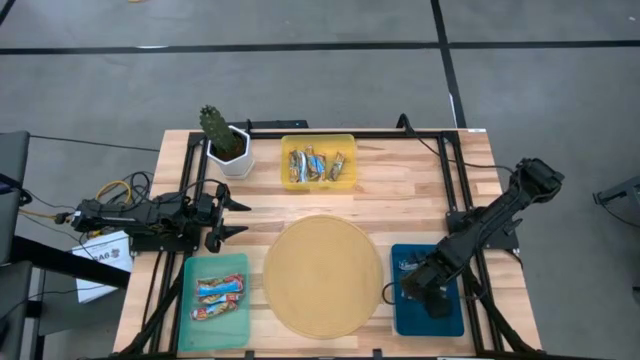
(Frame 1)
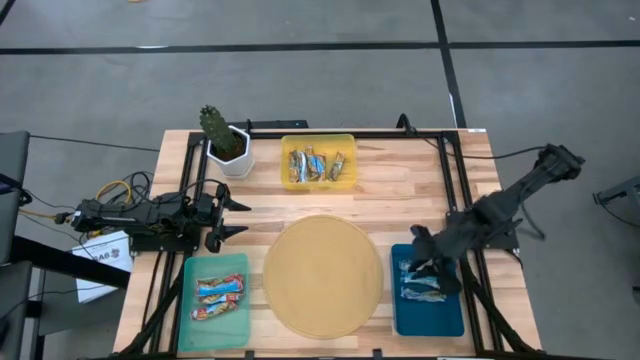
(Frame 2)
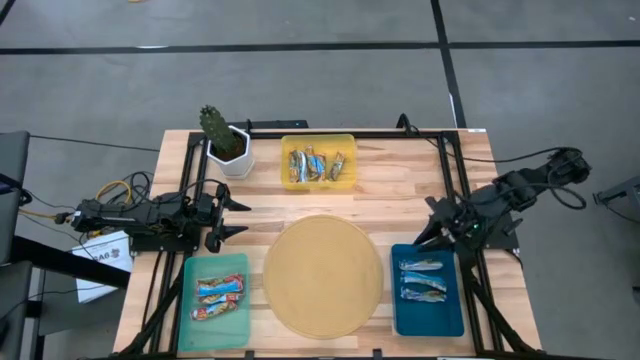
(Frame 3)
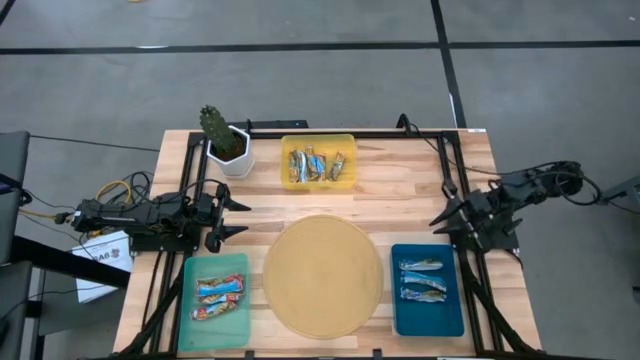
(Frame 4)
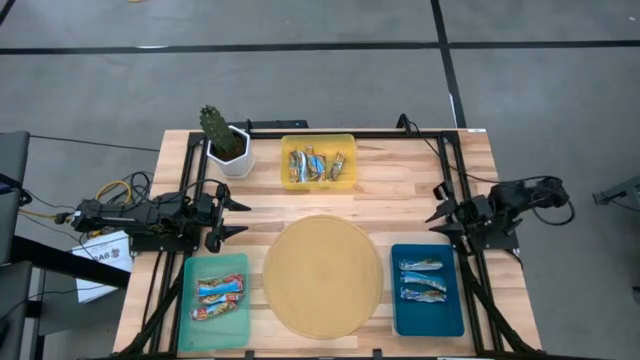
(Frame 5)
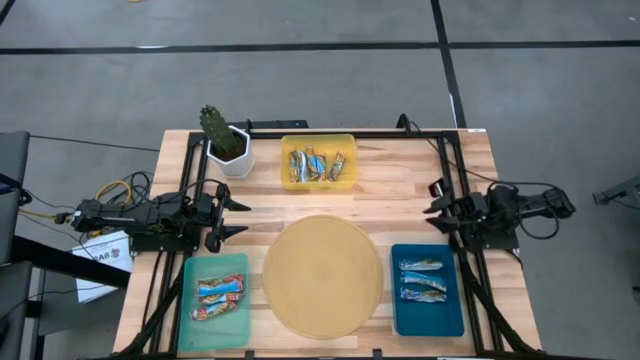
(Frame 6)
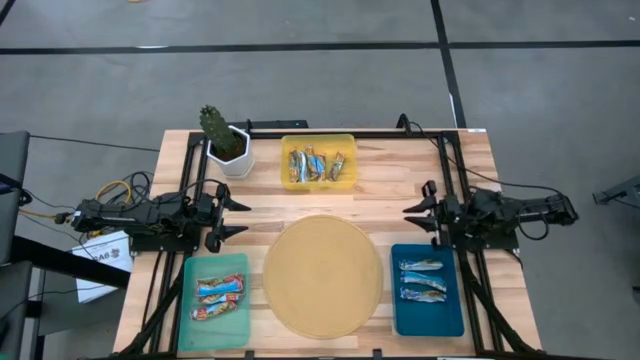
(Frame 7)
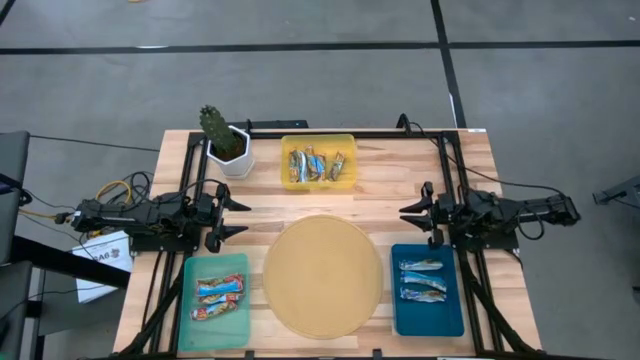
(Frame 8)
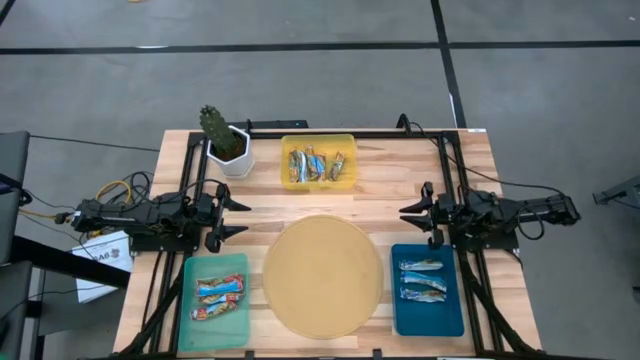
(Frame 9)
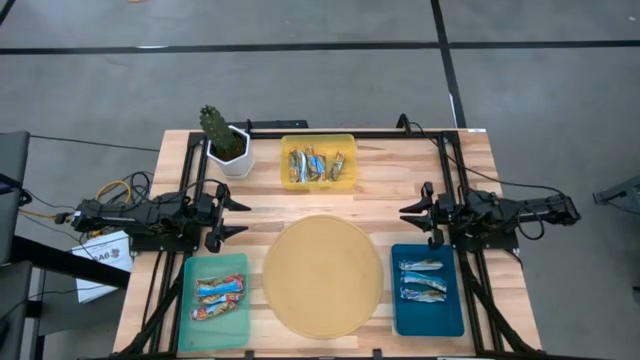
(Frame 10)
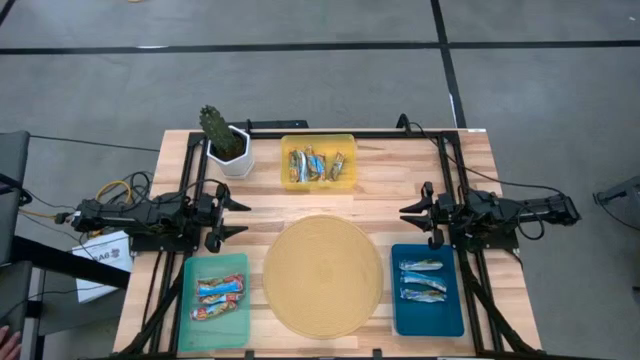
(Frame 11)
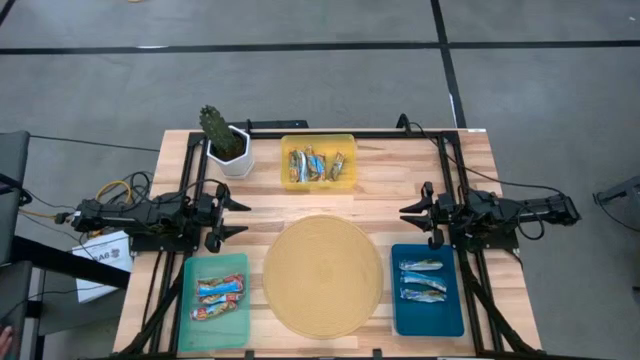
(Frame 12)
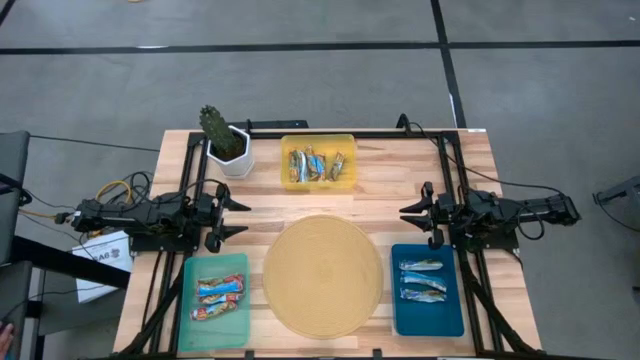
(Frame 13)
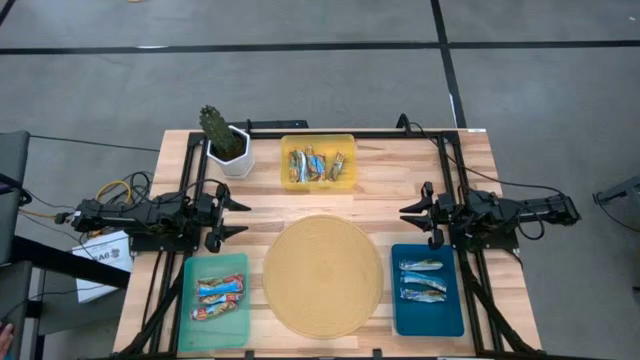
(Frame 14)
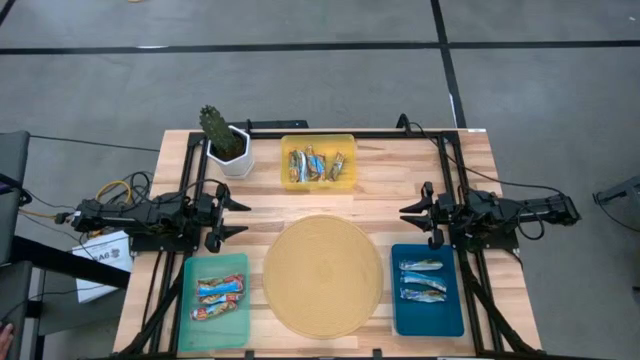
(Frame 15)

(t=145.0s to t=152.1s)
Task: Pick and place Granola Bars by type
Return to Home Position

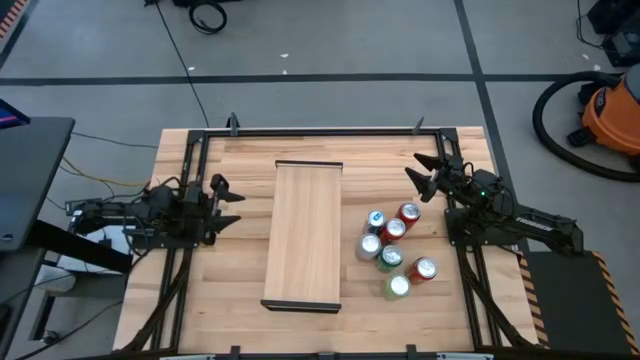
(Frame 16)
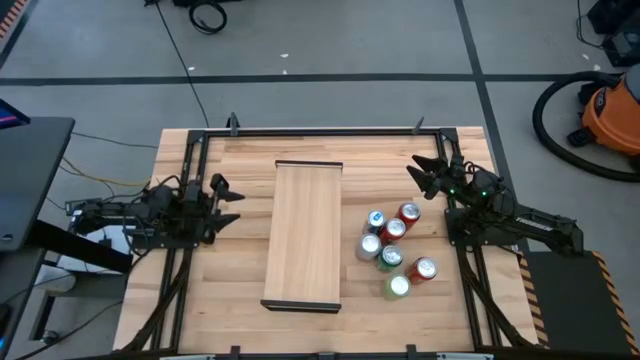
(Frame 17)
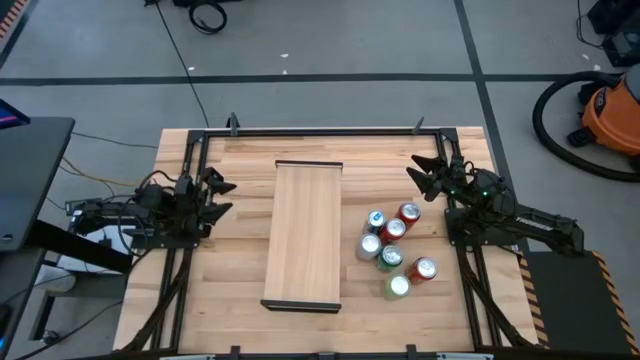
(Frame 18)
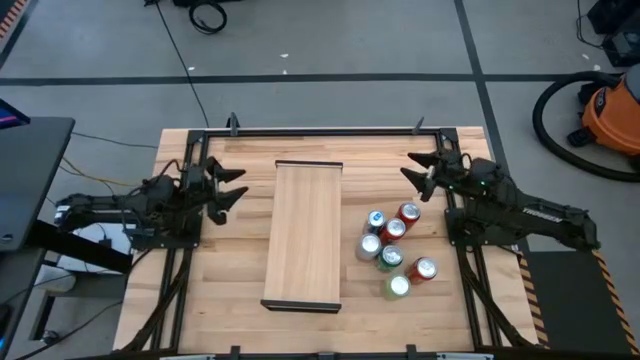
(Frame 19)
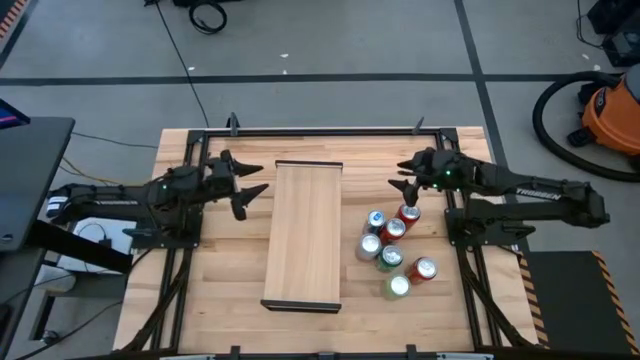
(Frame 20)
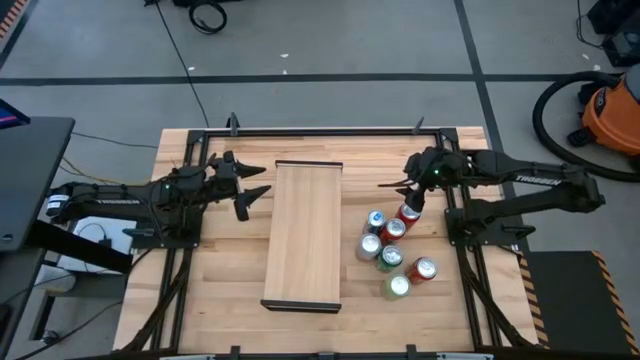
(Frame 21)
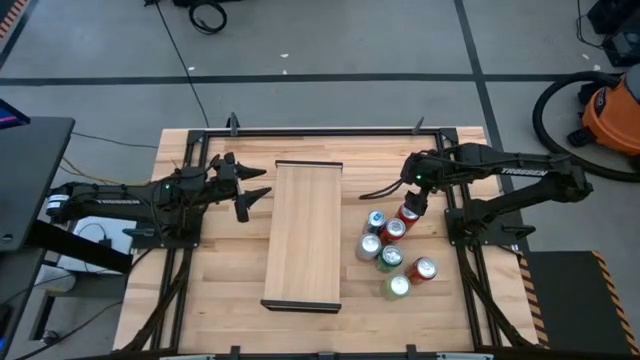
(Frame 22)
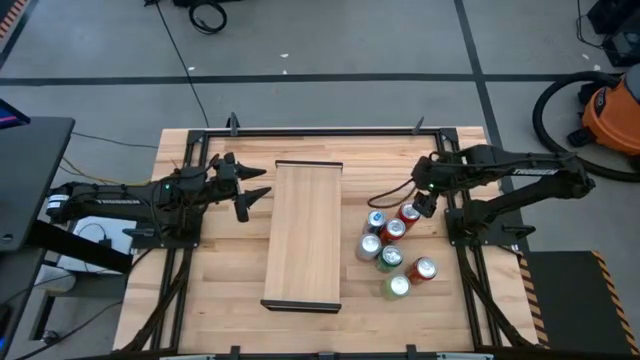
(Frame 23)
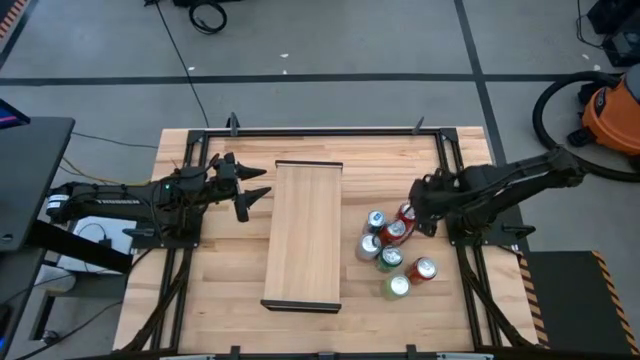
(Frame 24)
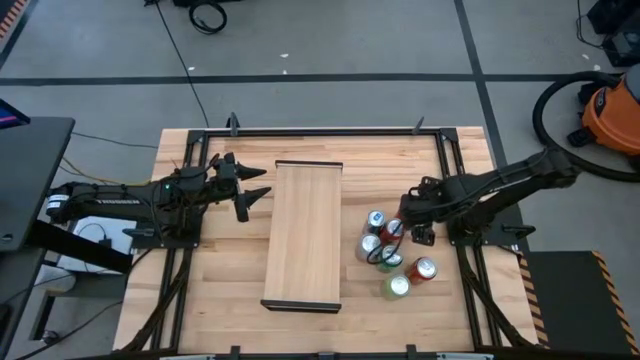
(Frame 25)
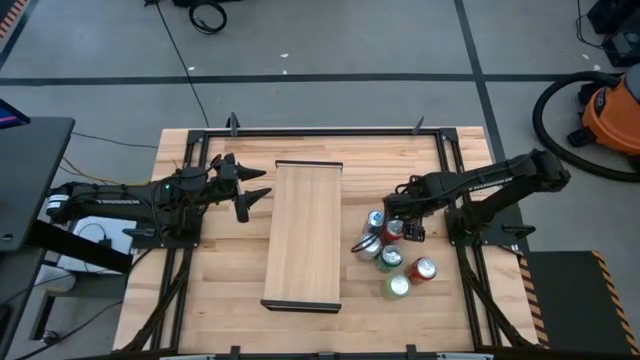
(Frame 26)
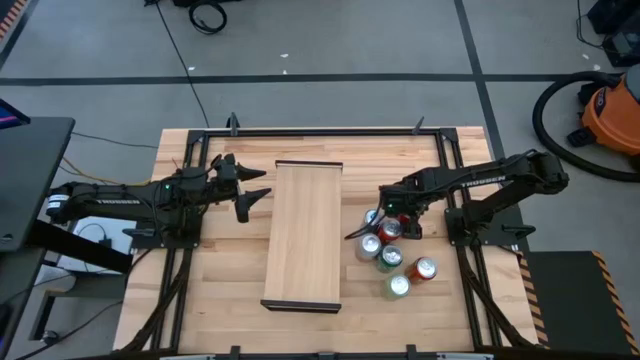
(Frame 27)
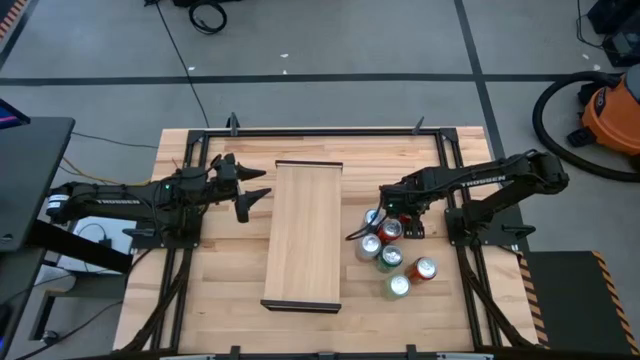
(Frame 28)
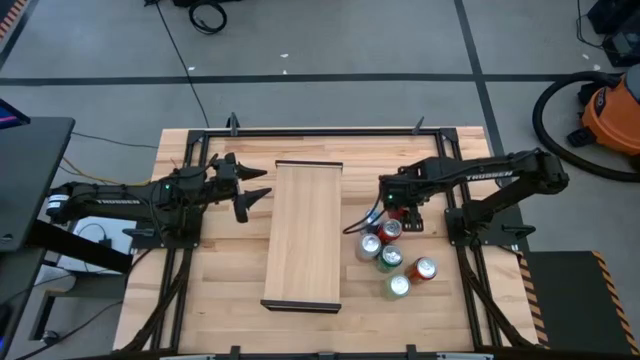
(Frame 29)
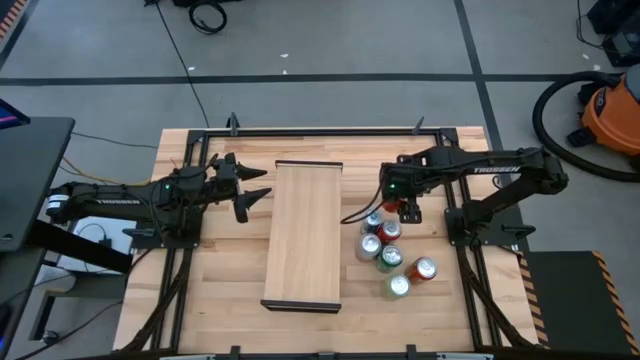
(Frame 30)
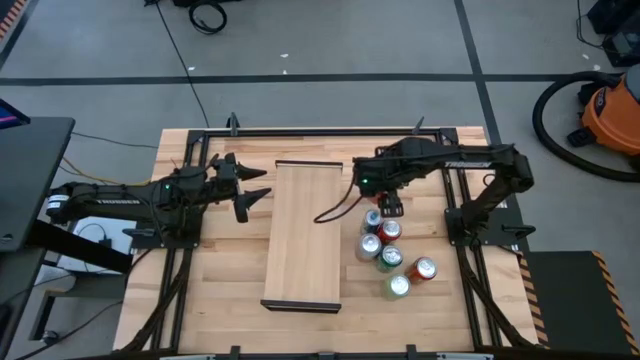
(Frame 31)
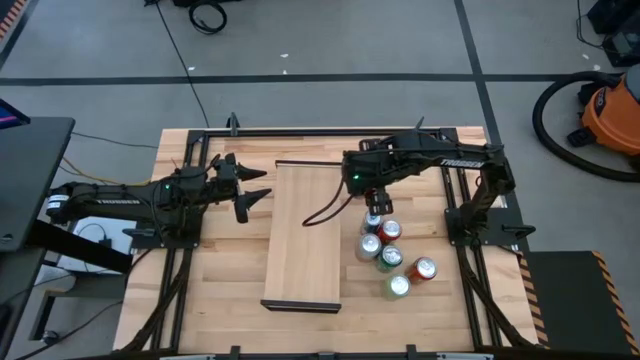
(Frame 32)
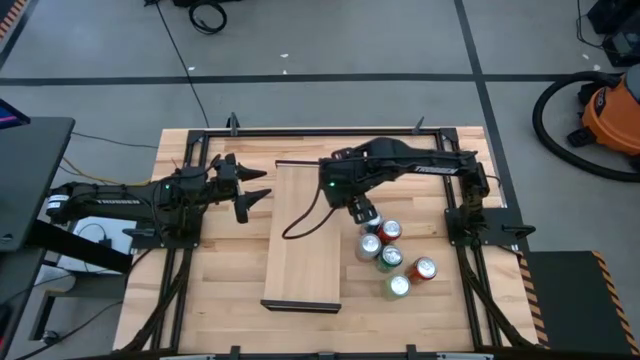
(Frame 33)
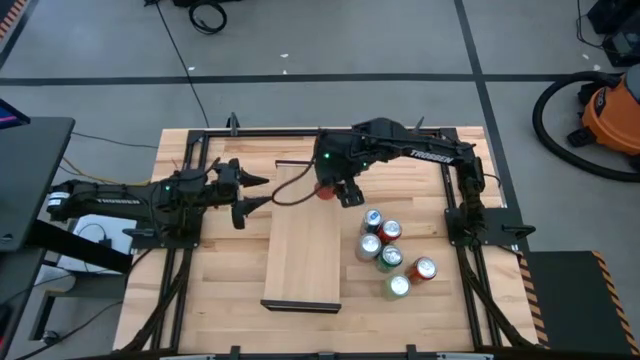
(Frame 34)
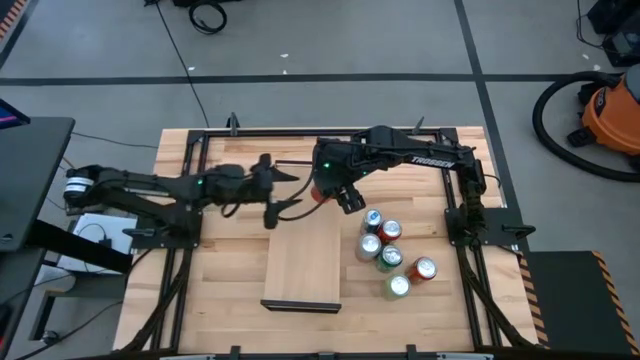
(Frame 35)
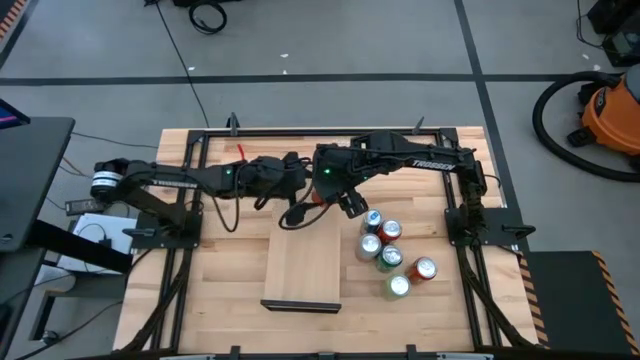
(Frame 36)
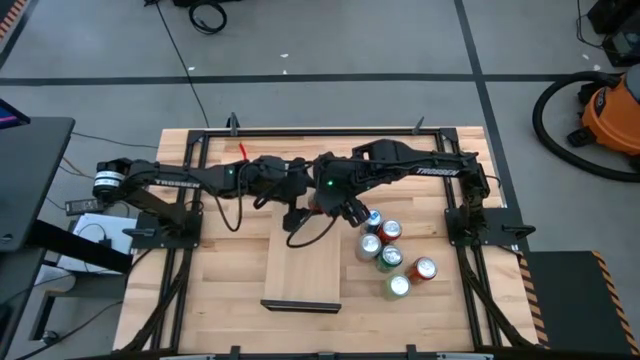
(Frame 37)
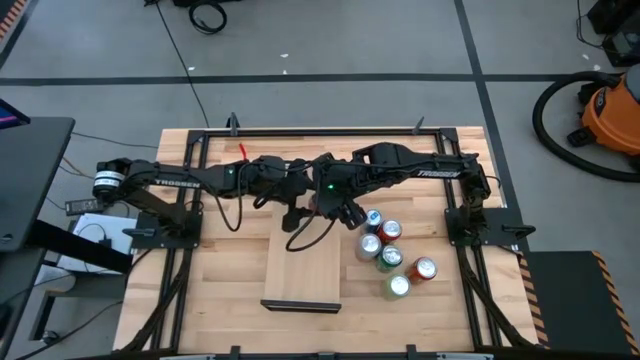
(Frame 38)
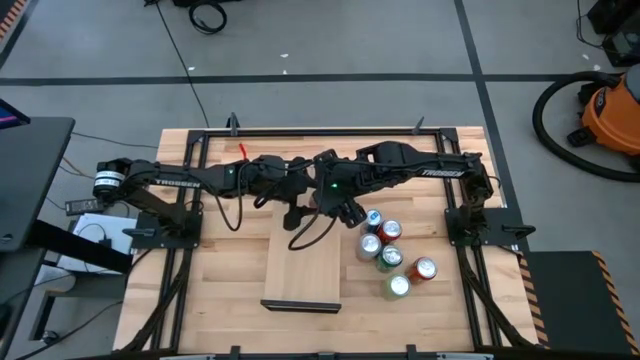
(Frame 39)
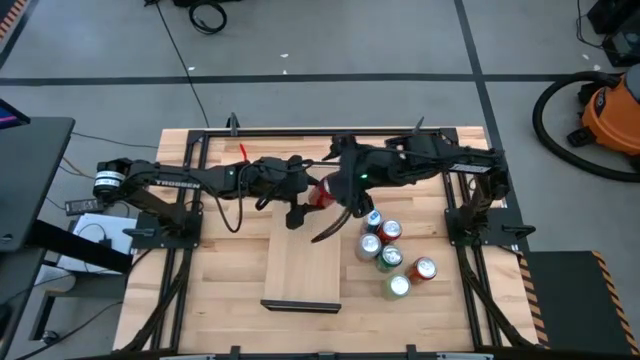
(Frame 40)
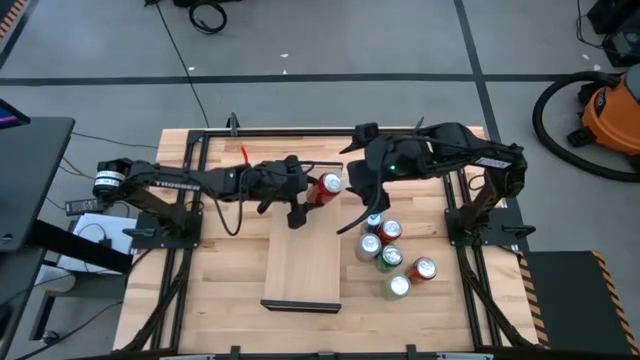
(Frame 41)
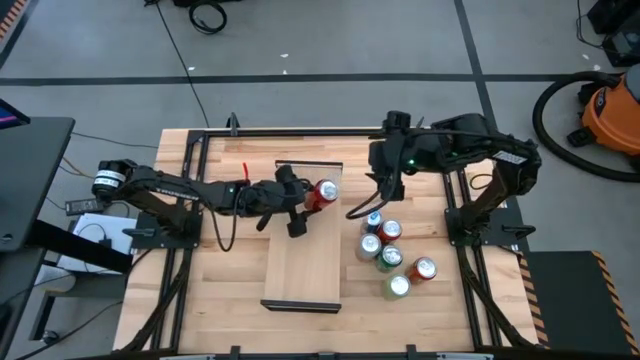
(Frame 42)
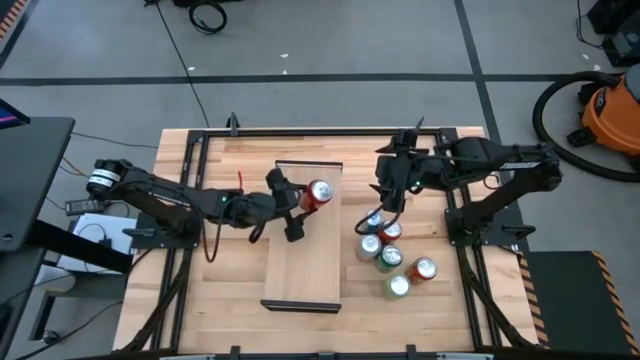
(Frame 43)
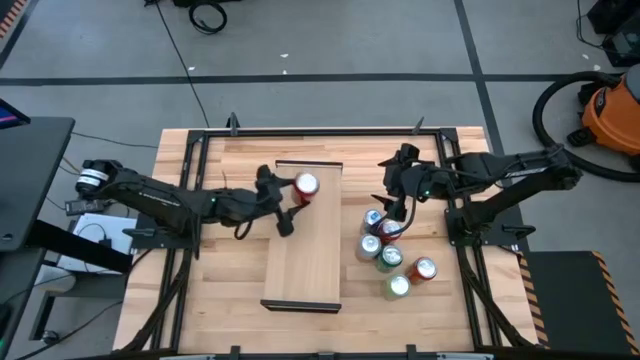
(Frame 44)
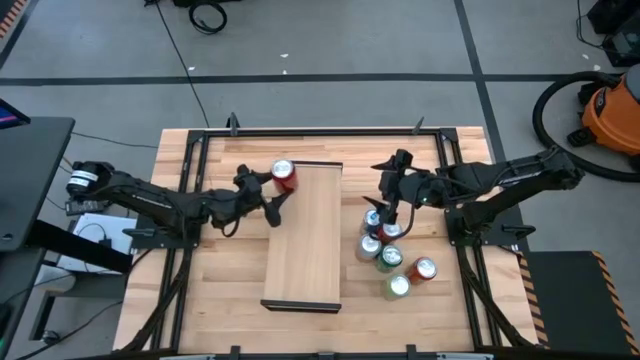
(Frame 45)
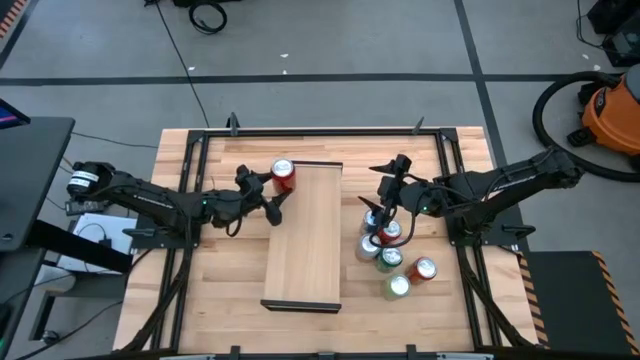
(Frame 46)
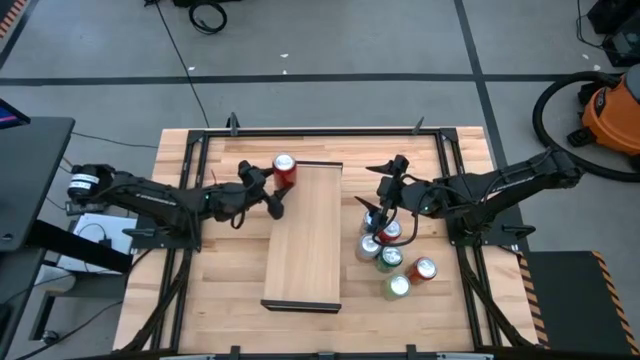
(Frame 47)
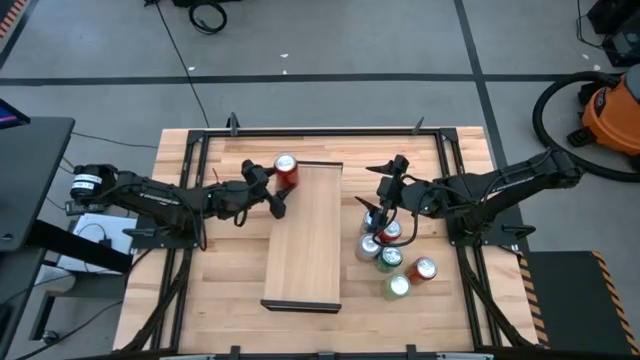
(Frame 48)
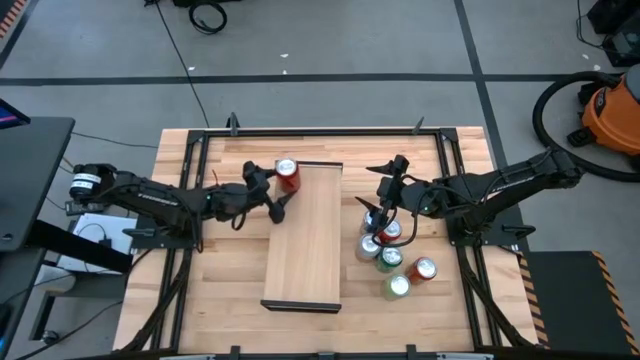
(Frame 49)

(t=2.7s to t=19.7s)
Task: Place canned beverage on shelf
Put the red soda can on the shelf
